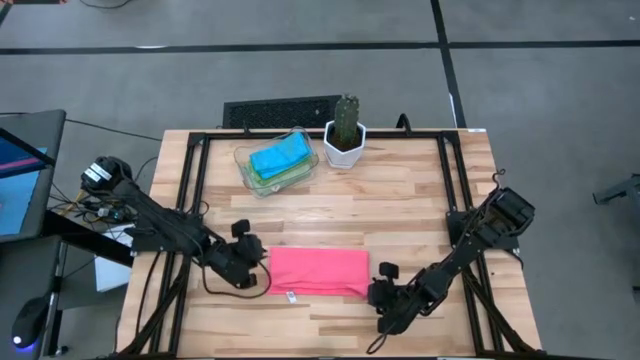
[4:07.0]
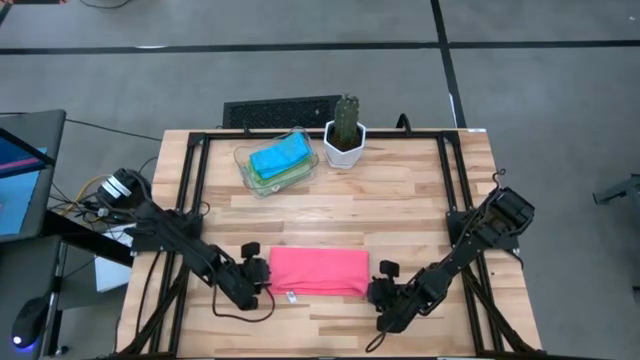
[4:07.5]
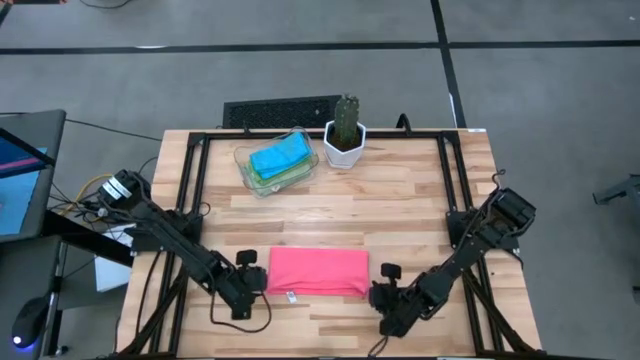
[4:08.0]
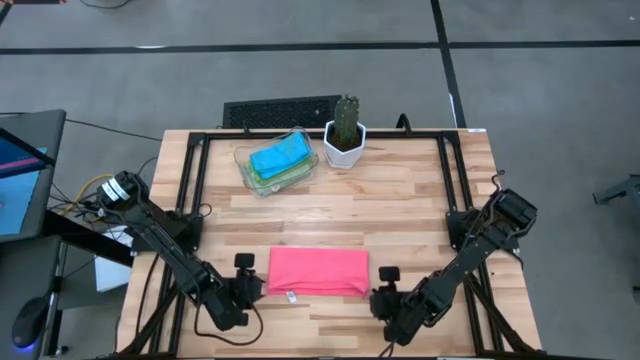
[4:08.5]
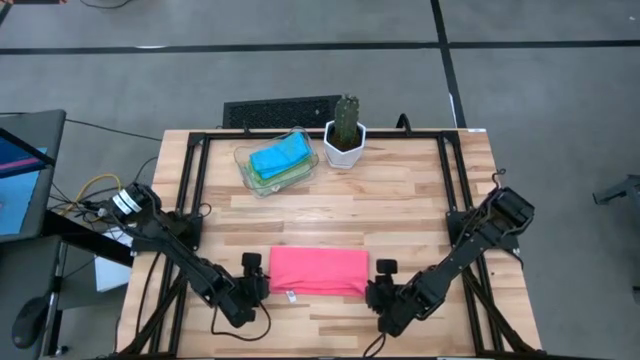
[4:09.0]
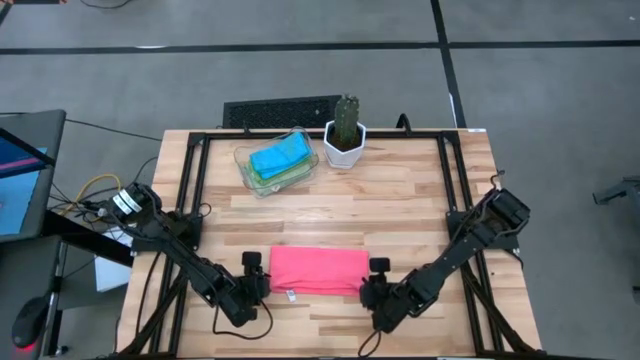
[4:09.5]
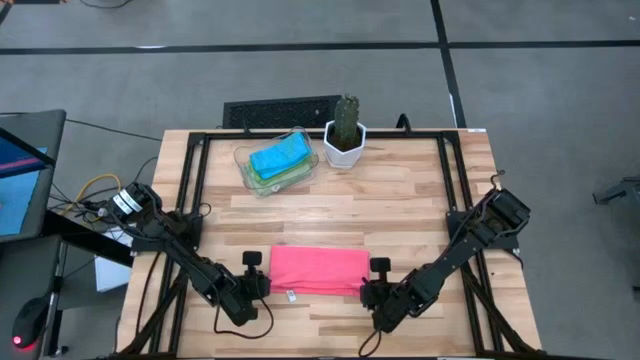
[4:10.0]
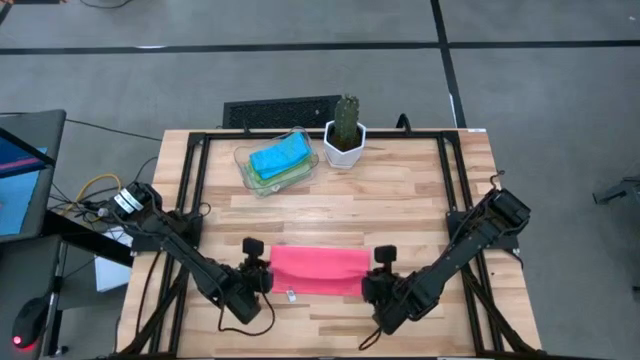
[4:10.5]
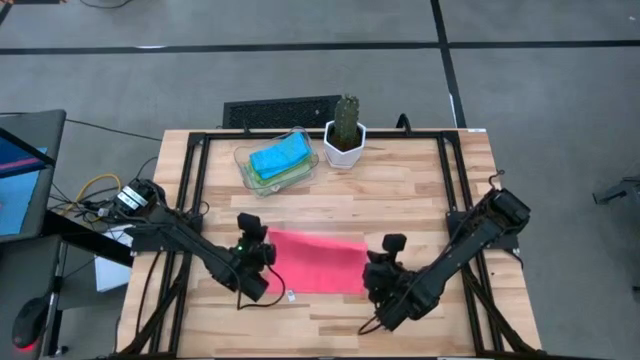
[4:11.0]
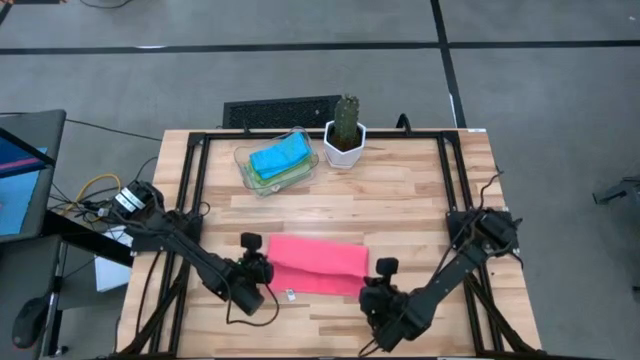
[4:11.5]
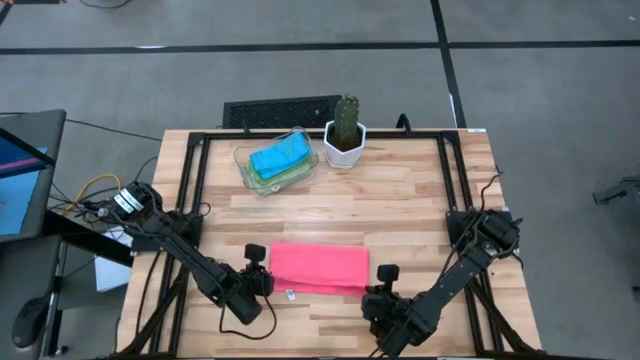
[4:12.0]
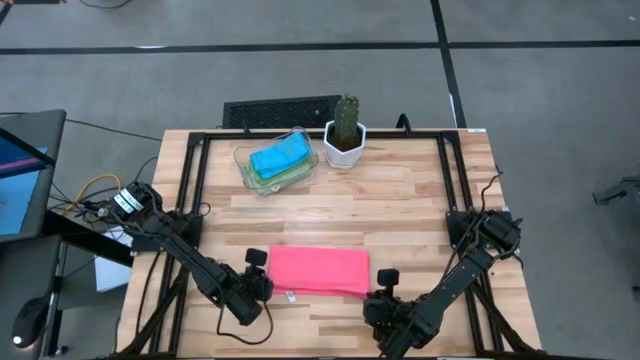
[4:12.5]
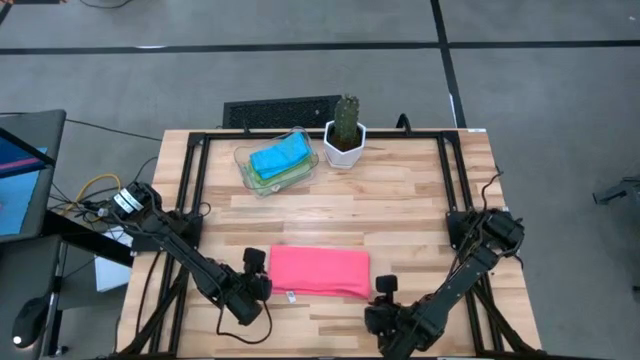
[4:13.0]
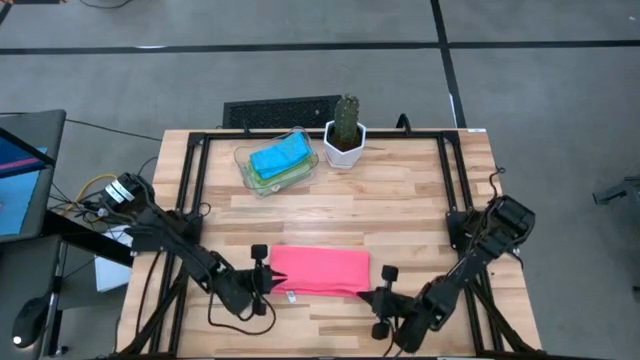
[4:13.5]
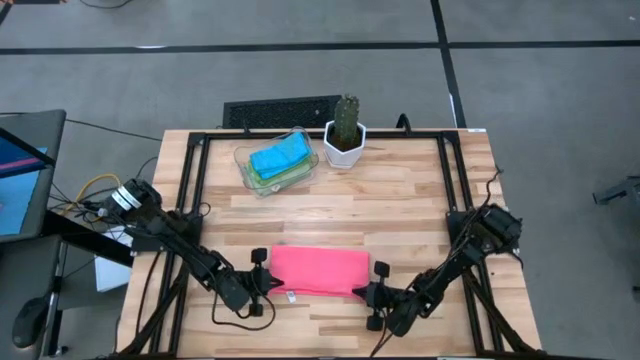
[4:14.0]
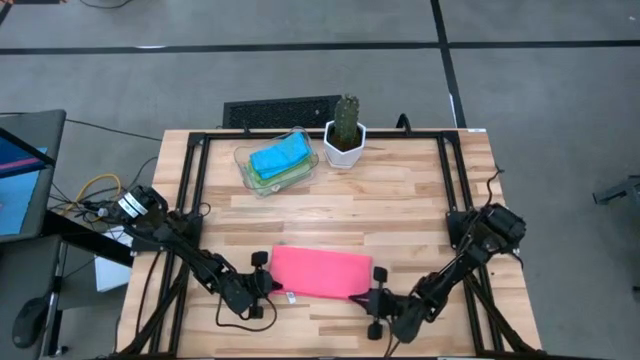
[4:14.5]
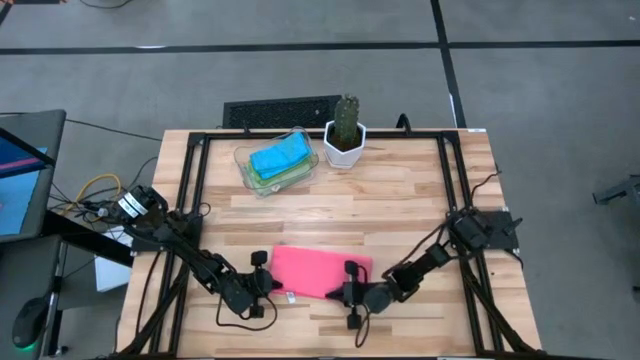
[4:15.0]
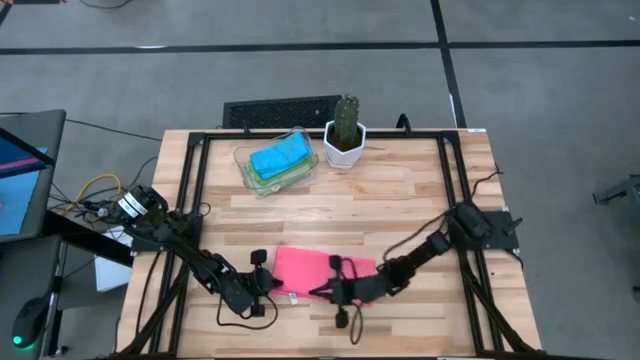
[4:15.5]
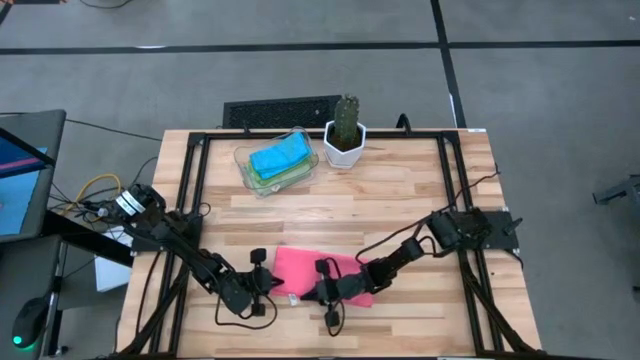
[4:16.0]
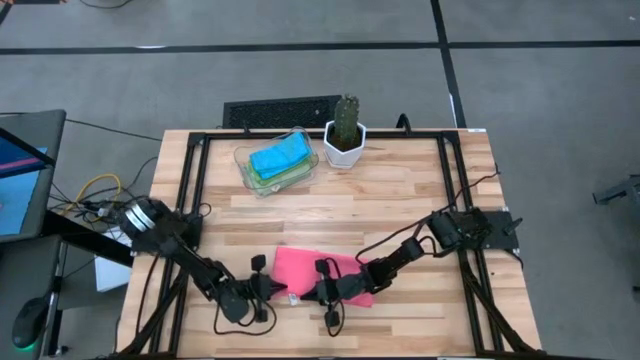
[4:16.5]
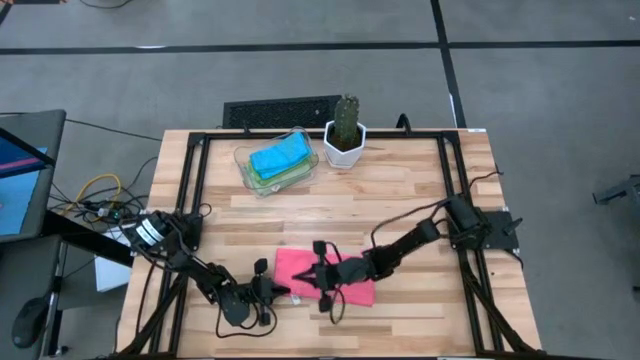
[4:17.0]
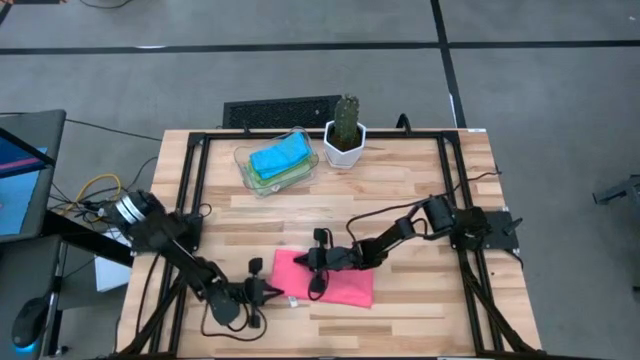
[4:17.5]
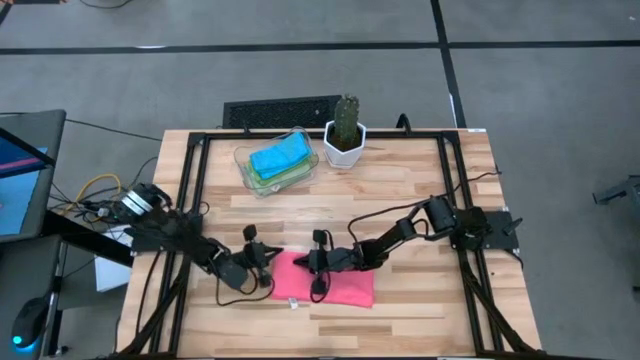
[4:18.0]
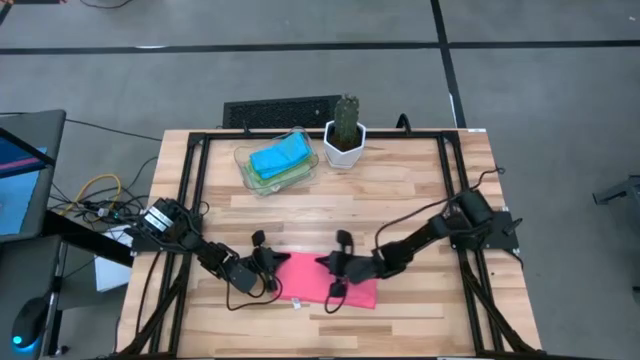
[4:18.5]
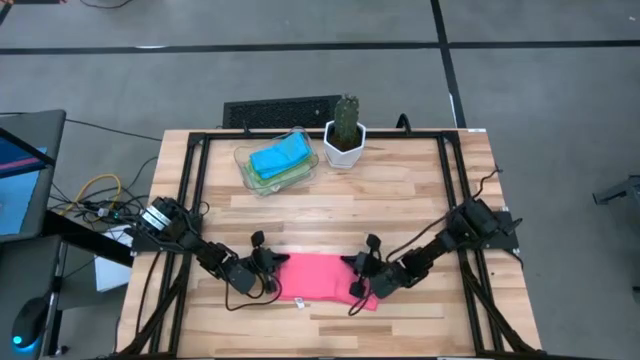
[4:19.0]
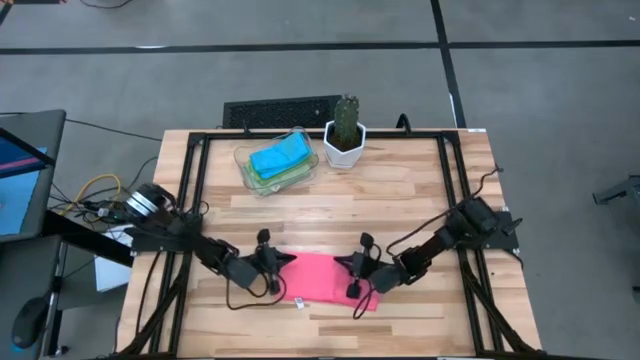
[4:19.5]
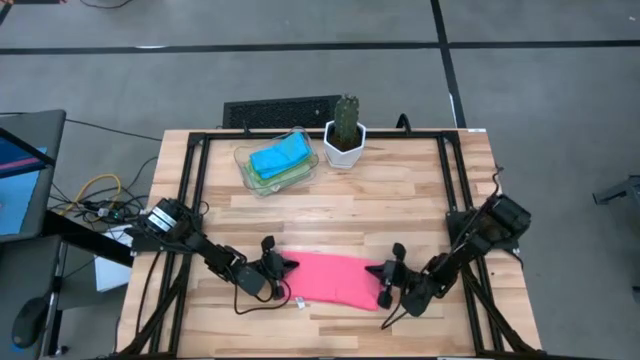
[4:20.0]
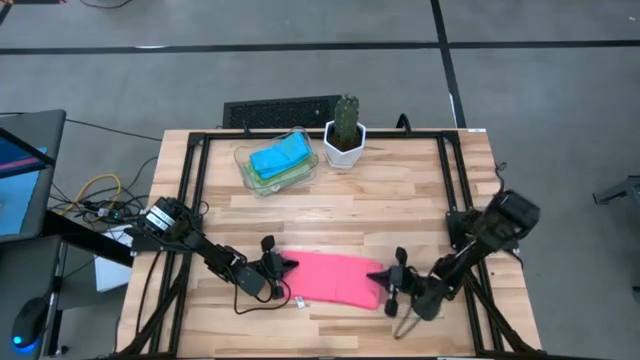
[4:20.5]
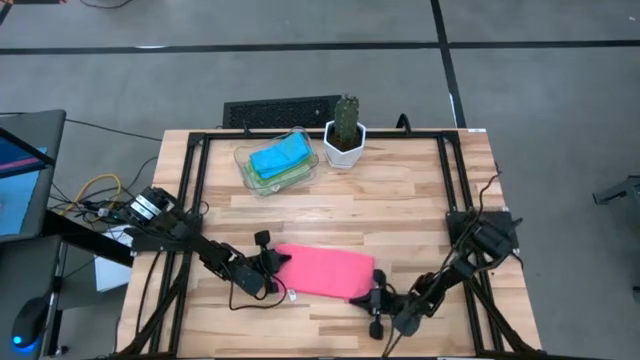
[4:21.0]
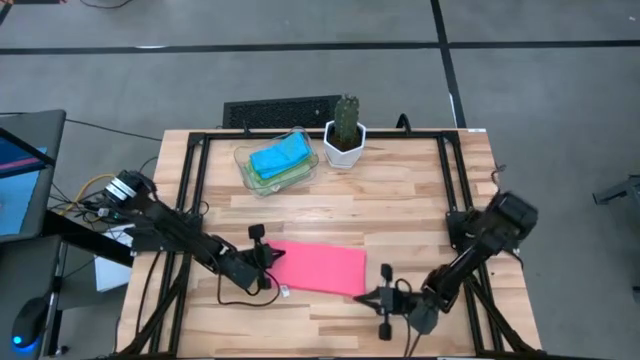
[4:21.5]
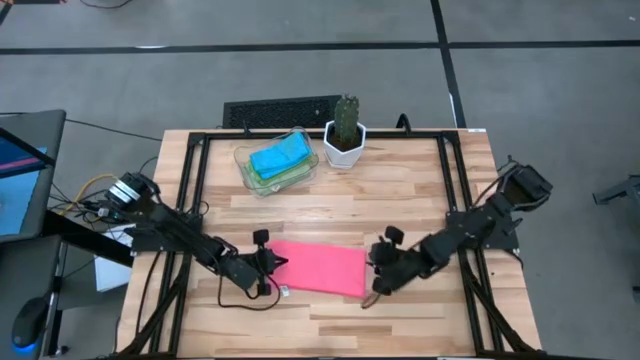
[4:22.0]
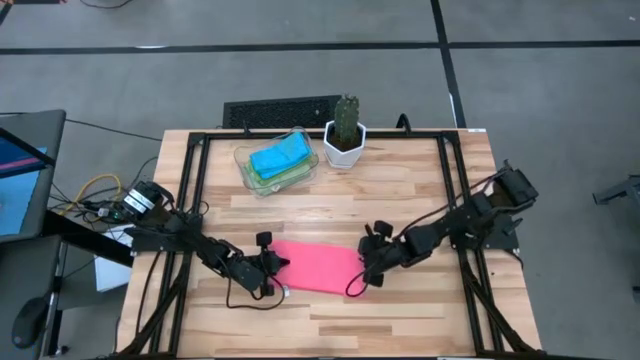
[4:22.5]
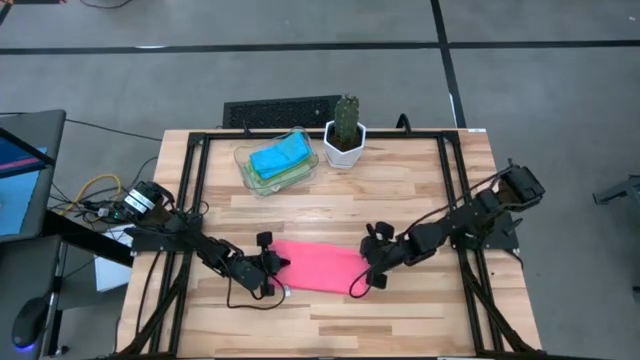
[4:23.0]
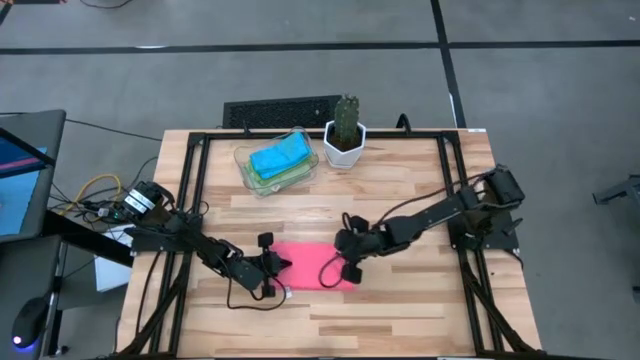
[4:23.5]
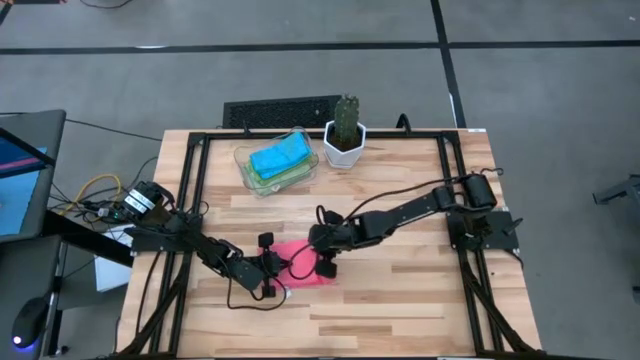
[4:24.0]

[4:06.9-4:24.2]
Task: Fold microfiber towels
Fold the pink microfiber towel

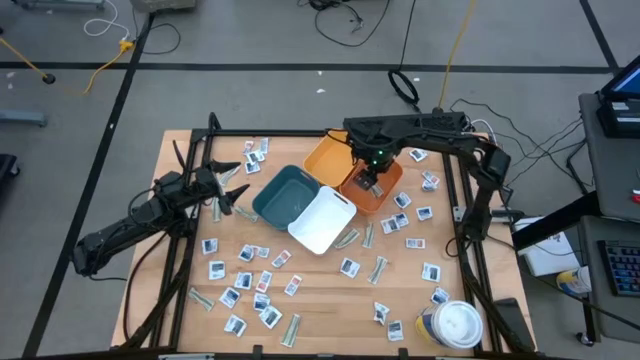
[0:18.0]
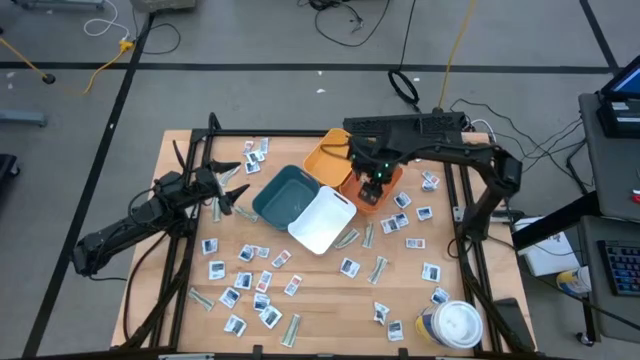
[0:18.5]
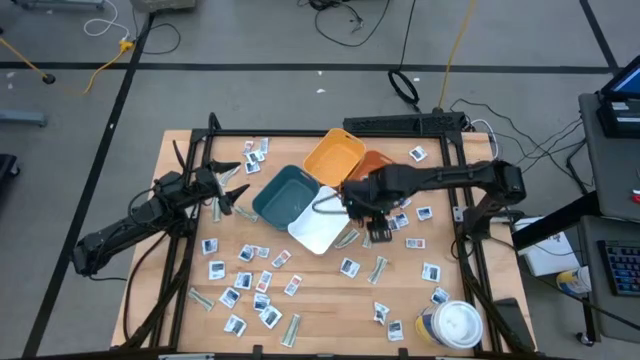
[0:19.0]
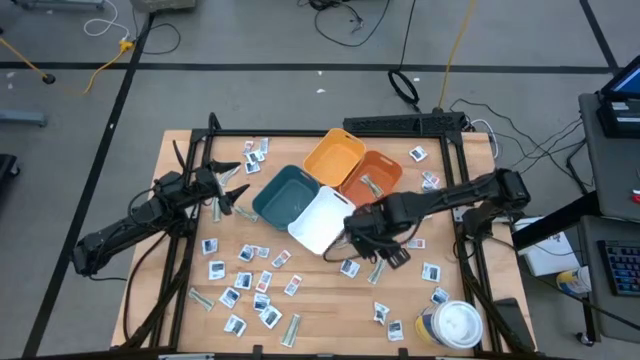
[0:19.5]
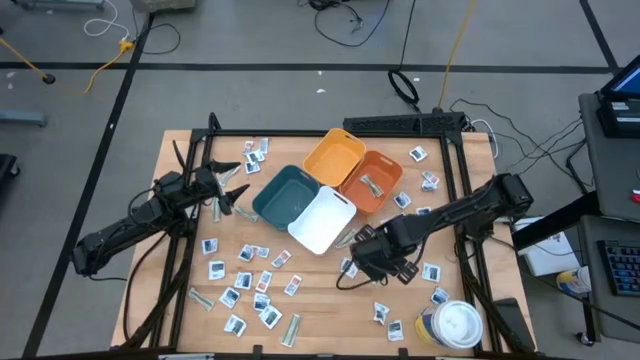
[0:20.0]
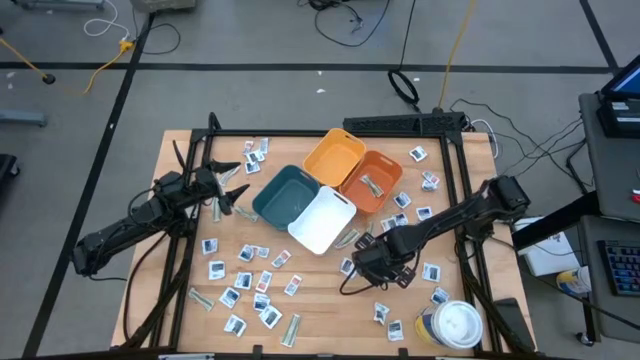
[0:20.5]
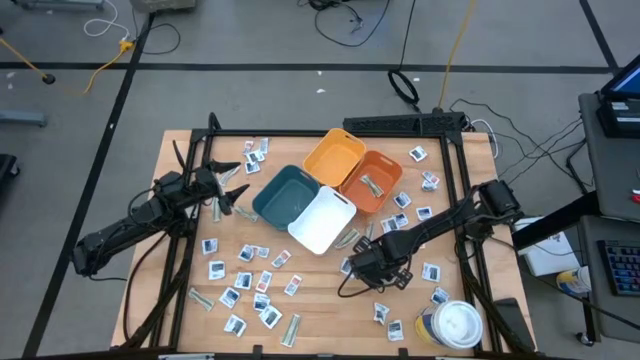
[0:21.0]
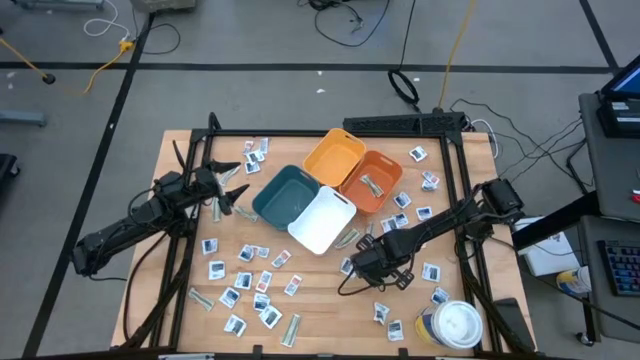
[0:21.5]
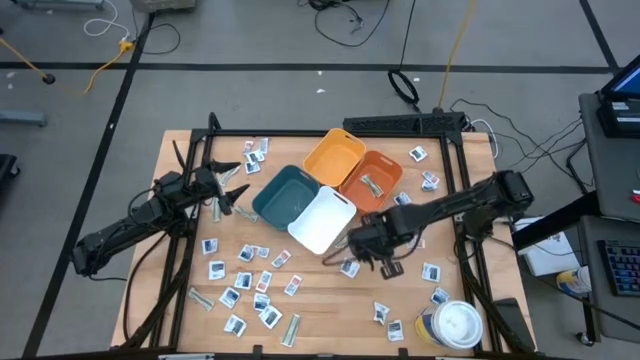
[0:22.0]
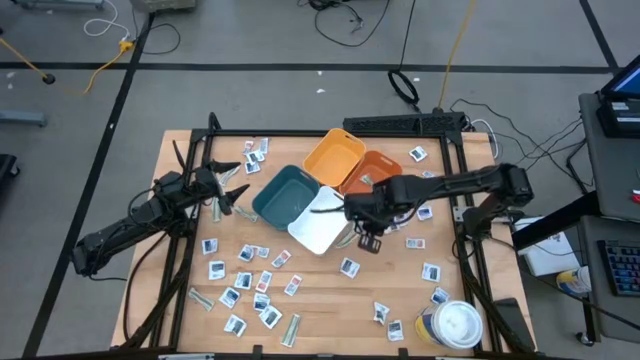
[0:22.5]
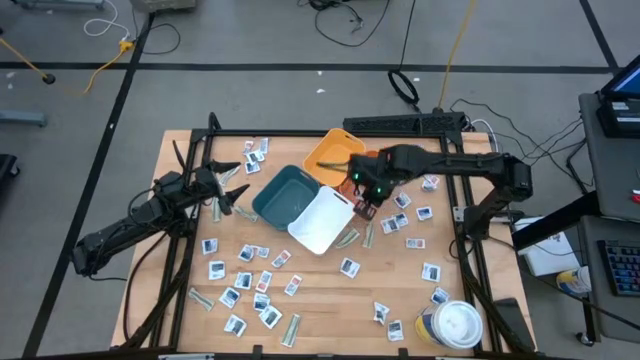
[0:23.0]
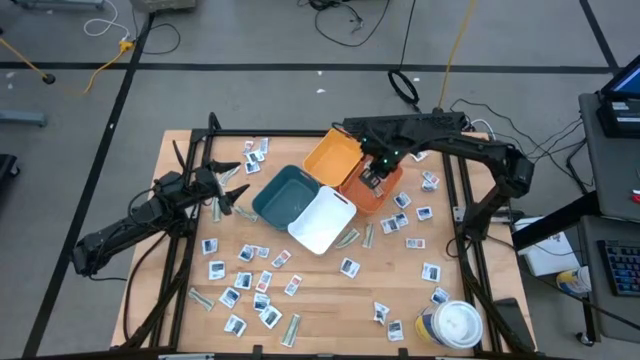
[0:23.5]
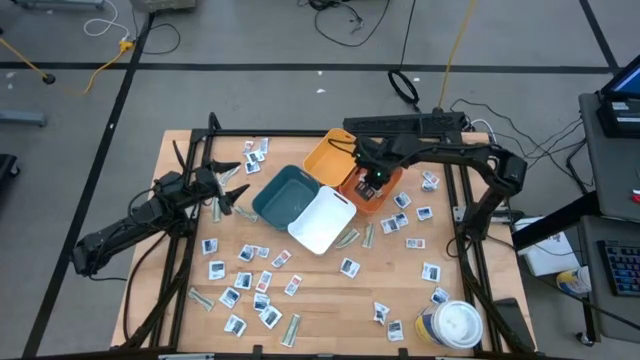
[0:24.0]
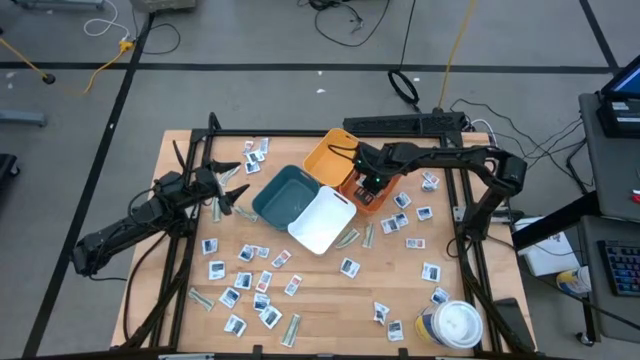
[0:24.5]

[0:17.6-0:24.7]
Task: Pick & Place First Aid Supplies
Put the green bandage pack into the orange bin
